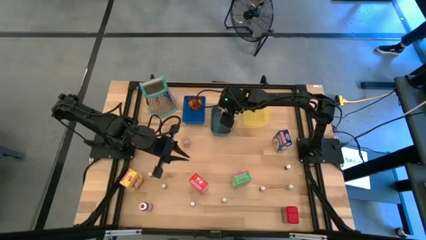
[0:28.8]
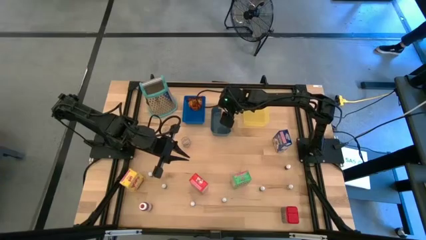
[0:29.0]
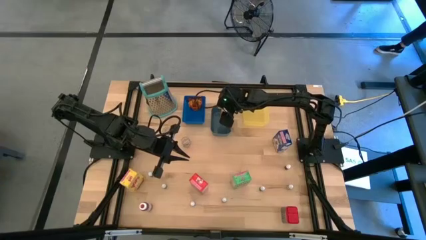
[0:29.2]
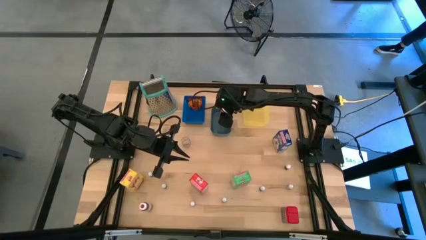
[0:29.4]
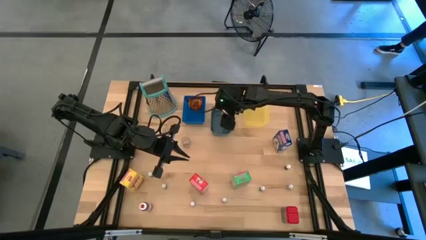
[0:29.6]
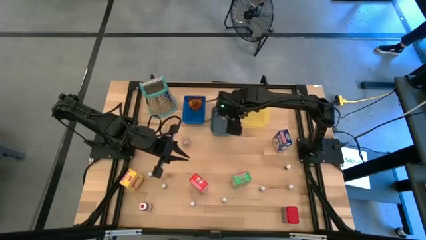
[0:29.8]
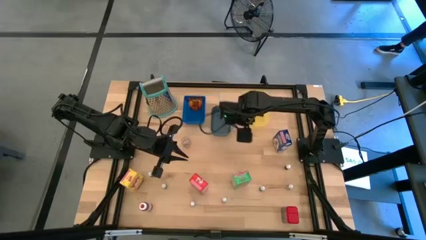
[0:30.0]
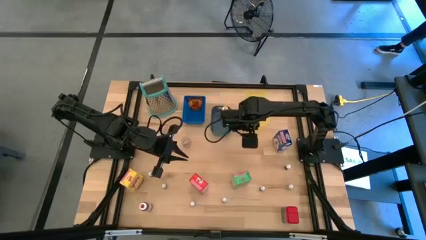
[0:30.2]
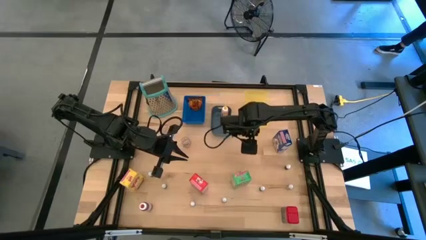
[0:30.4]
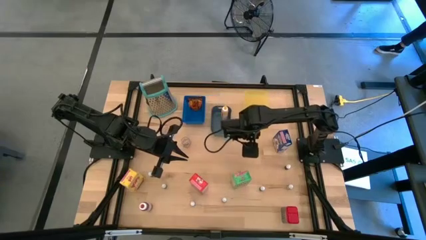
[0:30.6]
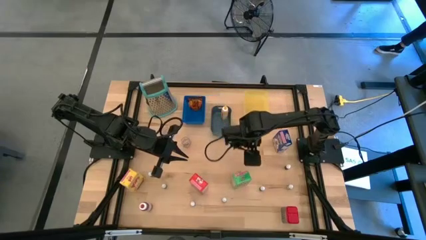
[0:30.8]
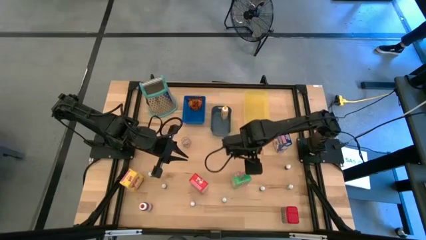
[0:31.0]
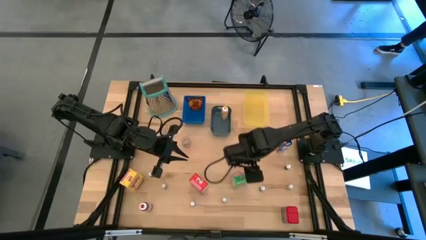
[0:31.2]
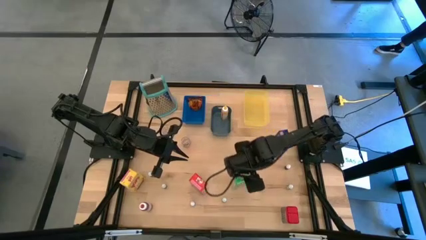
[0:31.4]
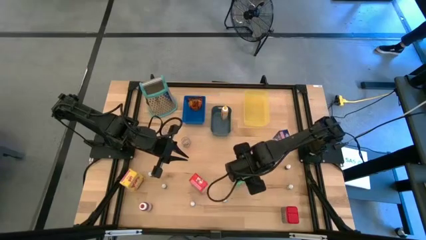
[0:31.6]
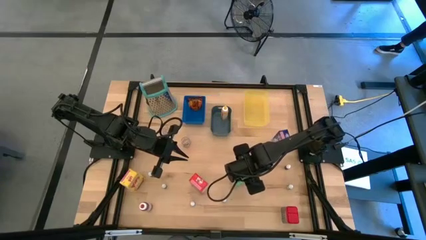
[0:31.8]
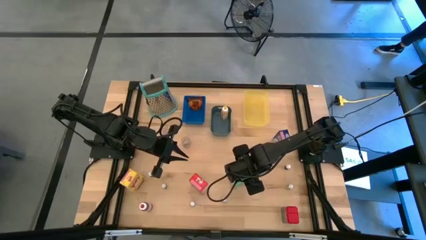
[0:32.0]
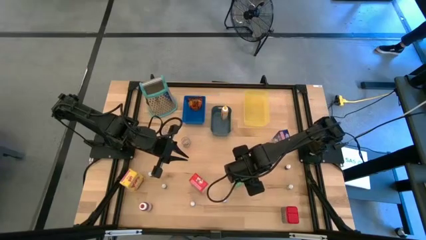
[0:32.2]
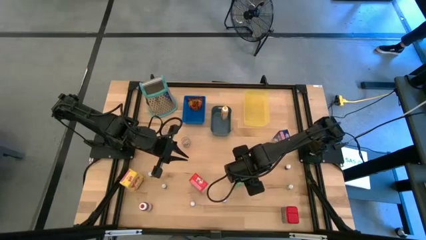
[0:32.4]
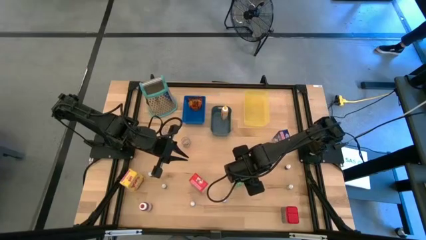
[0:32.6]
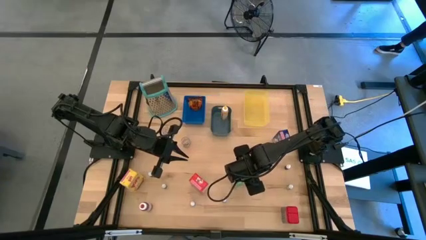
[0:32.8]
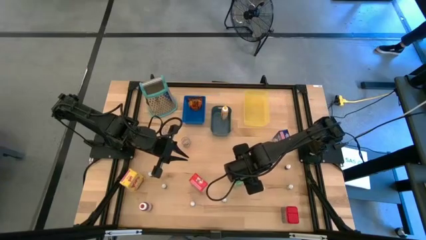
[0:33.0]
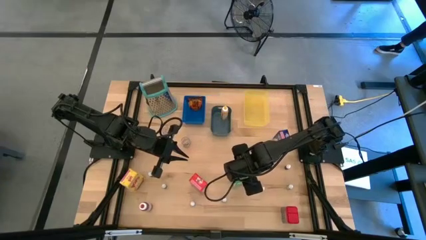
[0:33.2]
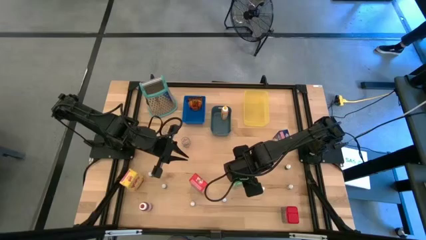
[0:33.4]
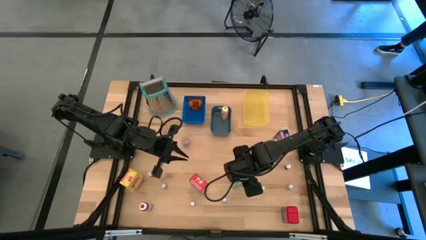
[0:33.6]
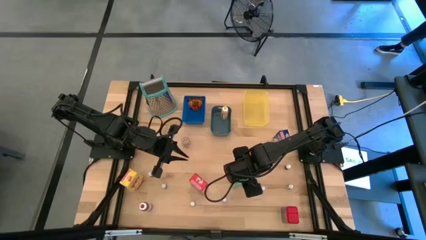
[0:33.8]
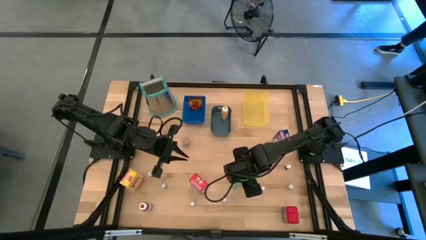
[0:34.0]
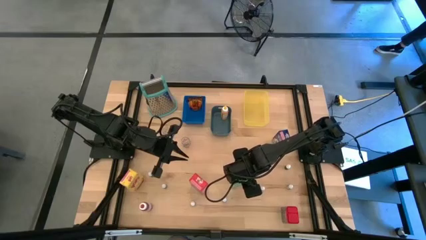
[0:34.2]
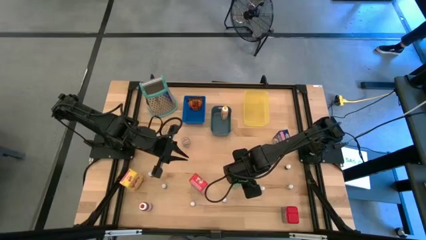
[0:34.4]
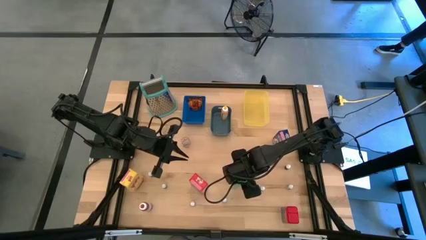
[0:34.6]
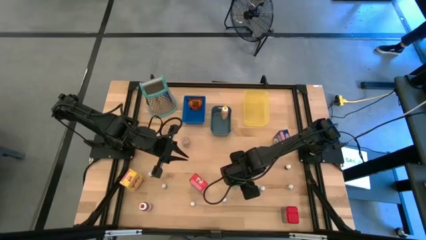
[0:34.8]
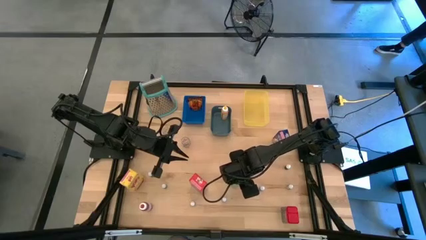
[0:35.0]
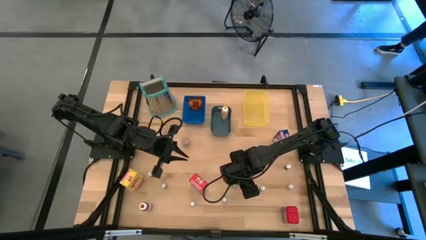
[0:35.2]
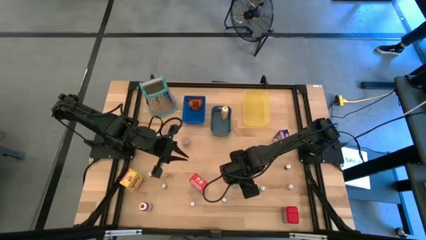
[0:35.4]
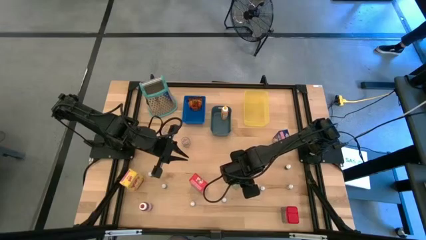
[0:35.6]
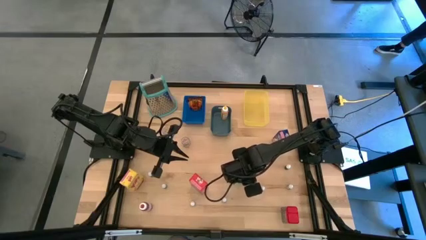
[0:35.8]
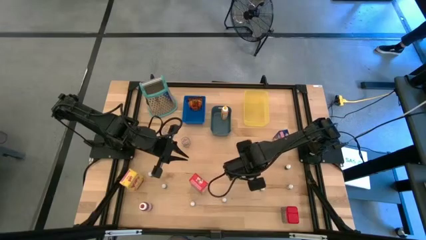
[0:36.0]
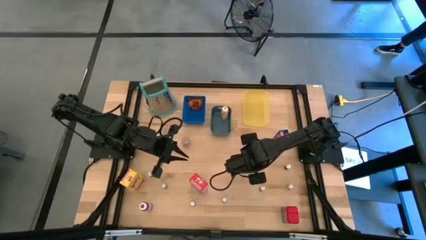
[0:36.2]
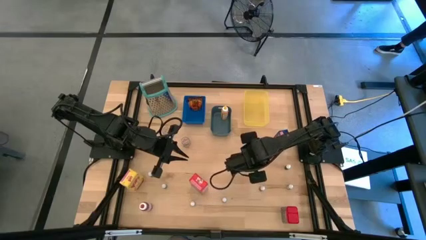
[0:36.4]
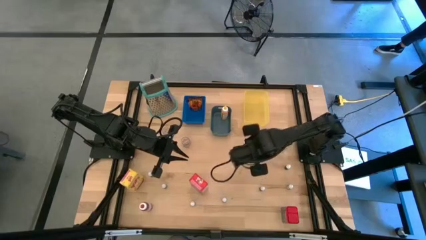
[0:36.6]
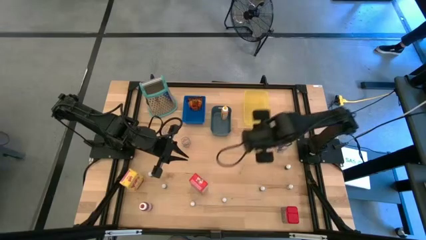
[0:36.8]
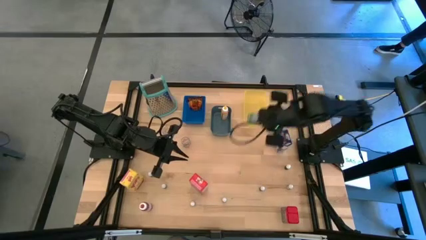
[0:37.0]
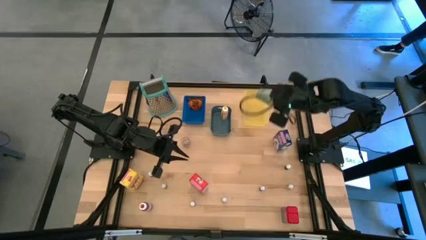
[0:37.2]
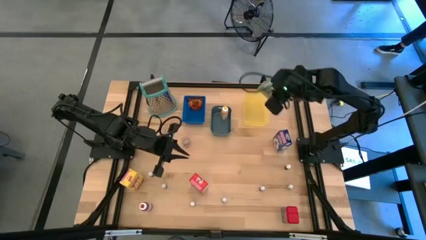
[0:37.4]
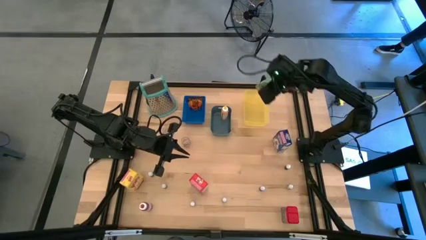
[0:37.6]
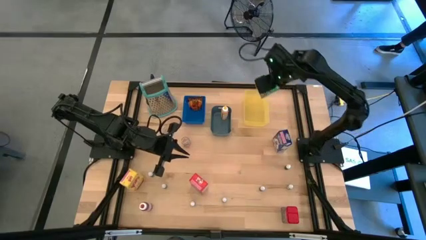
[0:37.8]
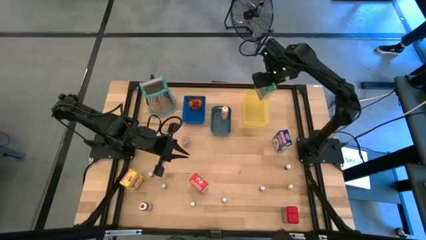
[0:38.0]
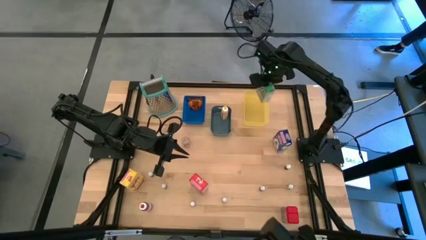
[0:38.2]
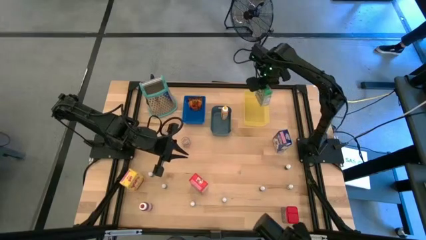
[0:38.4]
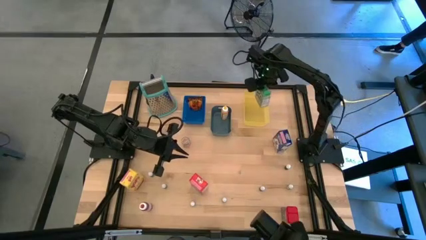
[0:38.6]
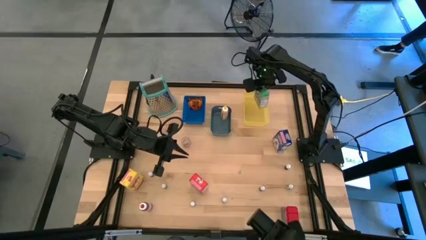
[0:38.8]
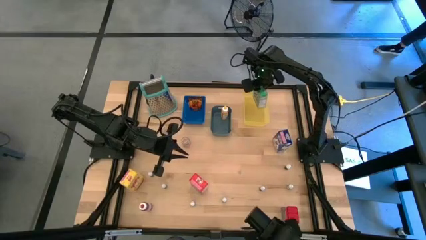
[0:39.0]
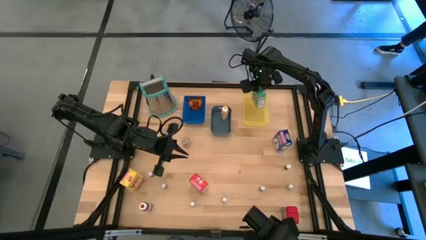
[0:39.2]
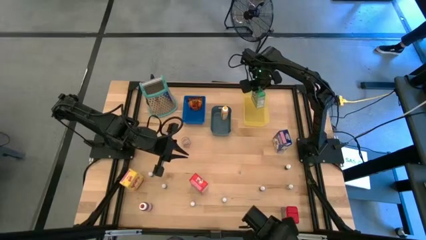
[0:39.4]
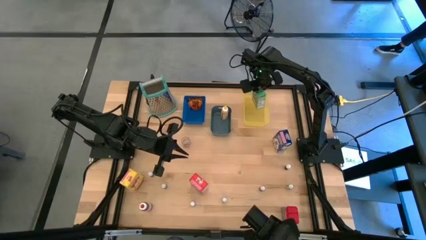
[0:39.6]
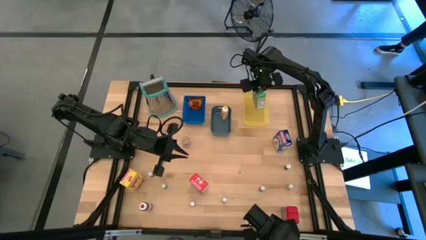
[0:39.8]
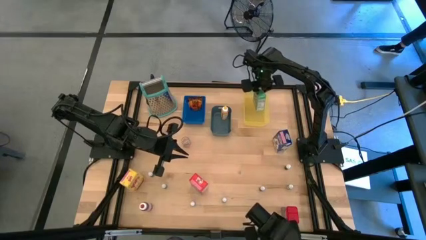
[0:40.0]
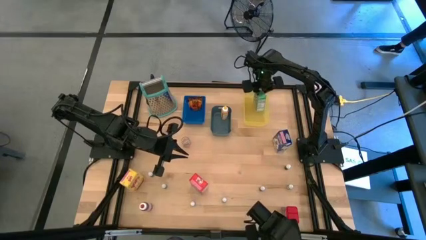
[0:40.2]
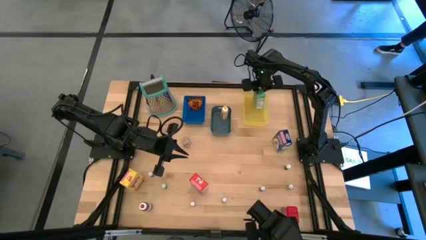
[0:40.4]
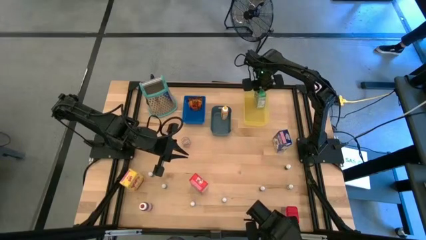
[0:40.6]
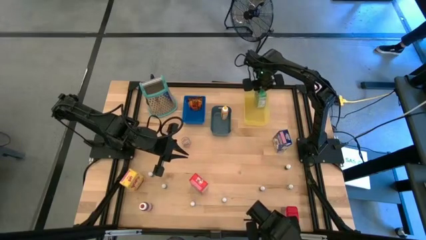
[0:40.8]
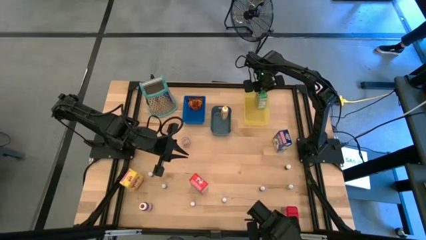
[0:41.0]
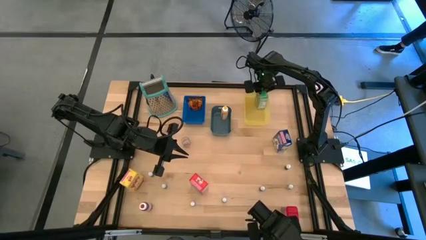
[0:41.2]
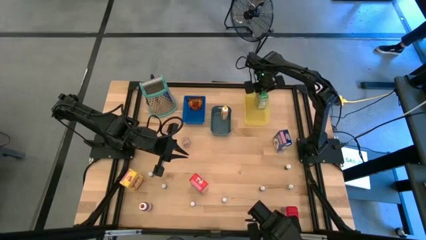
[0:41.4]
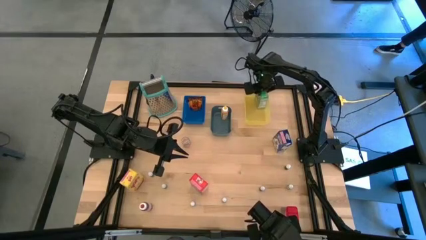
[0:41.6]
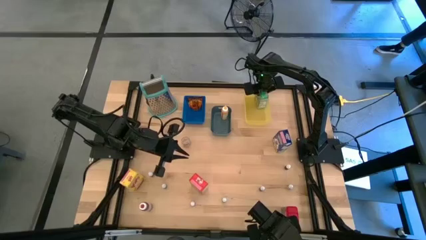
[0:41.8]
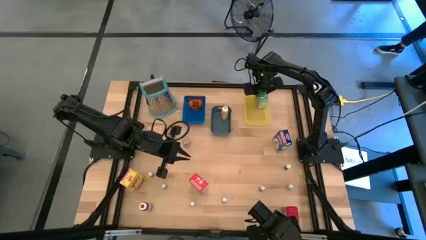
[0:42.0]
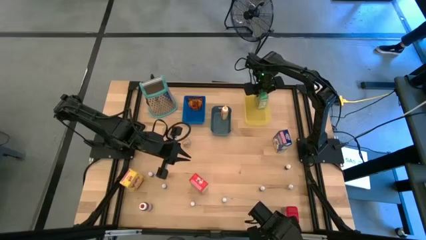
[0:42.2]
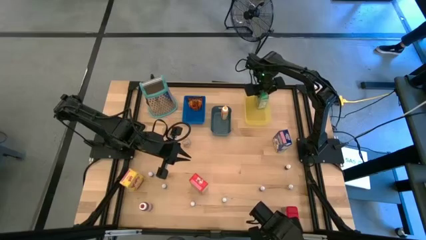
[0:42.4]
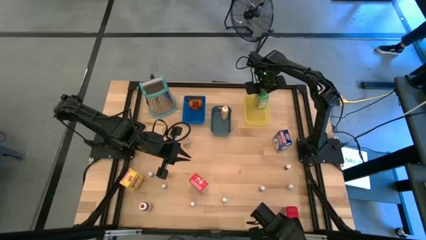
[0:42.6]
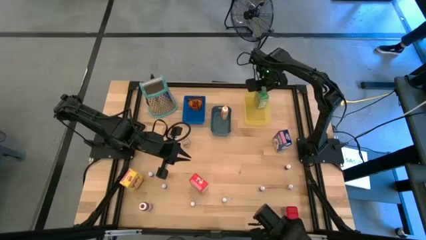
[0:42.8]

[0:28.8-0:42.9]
Task: Pick & Place Kitchen Items
Put the green cereal box into the yellow bin

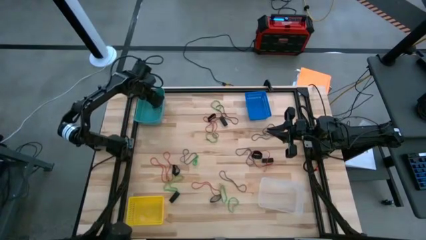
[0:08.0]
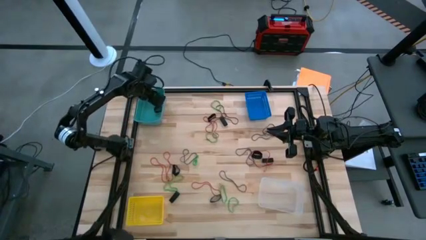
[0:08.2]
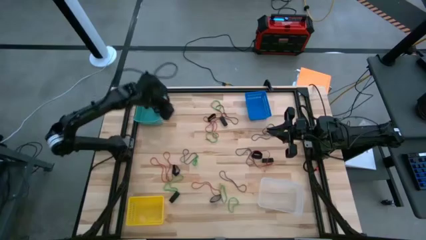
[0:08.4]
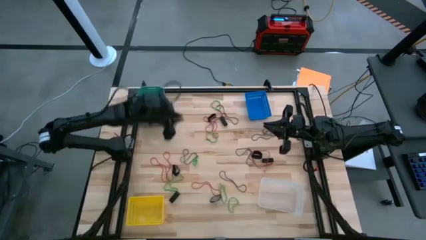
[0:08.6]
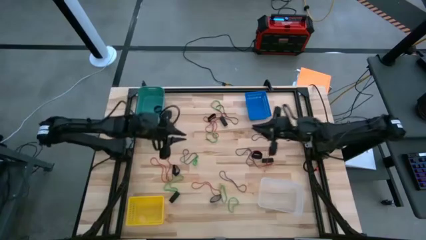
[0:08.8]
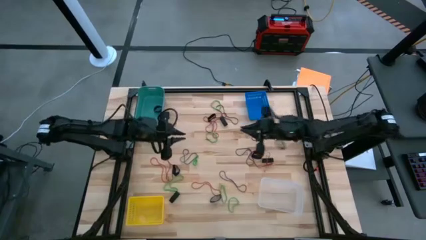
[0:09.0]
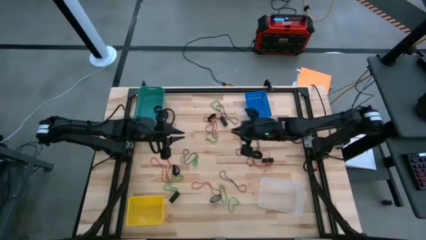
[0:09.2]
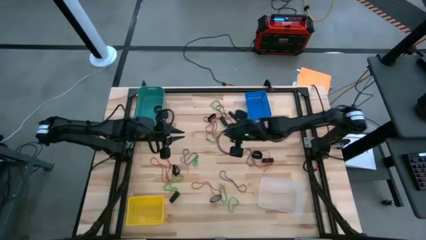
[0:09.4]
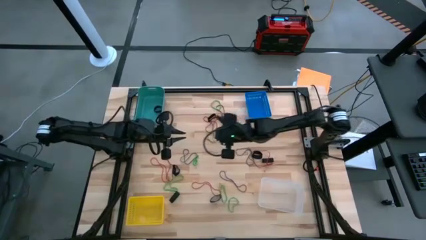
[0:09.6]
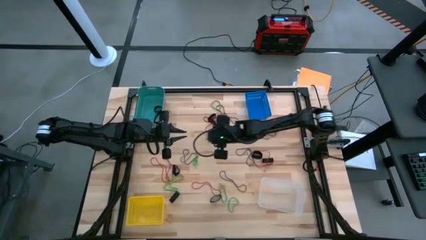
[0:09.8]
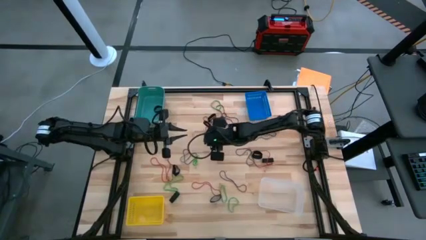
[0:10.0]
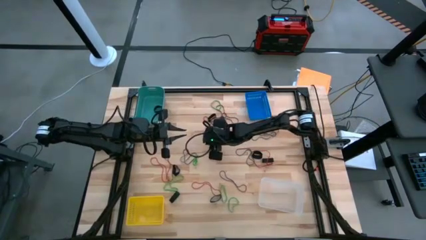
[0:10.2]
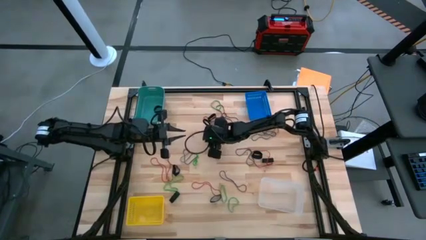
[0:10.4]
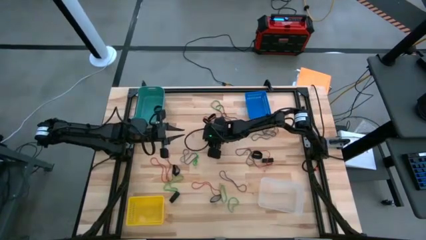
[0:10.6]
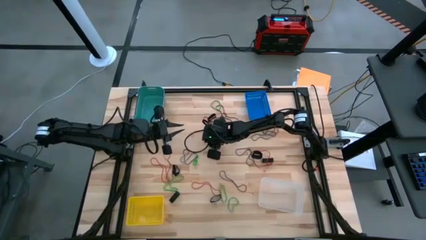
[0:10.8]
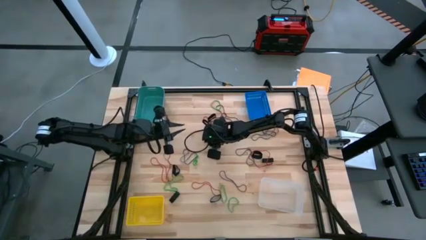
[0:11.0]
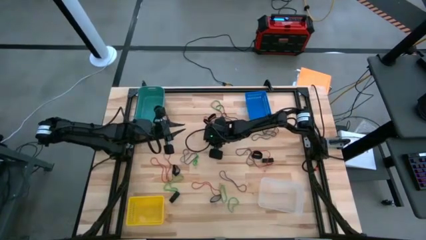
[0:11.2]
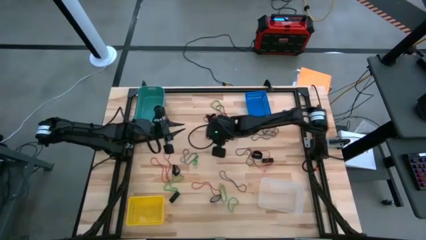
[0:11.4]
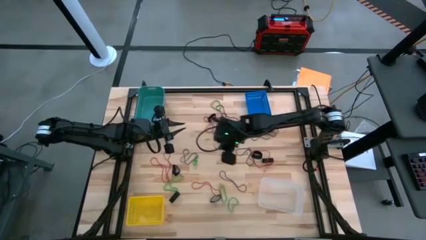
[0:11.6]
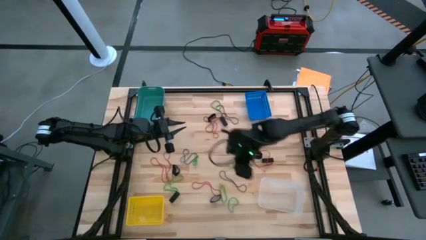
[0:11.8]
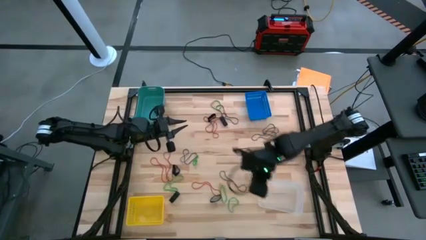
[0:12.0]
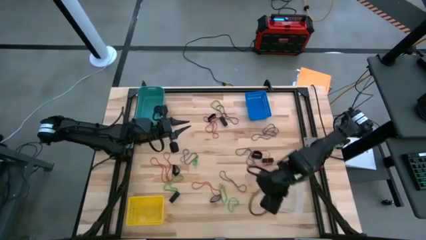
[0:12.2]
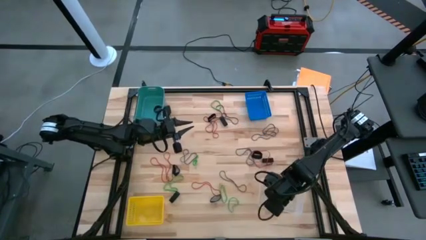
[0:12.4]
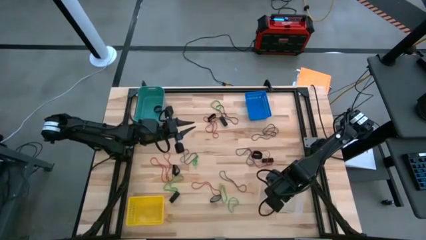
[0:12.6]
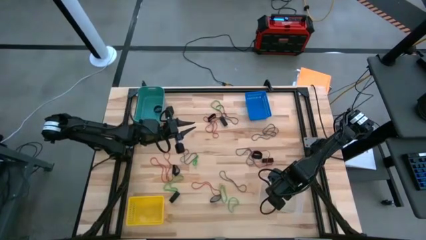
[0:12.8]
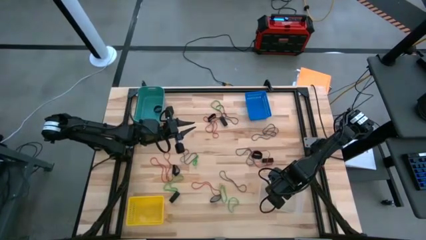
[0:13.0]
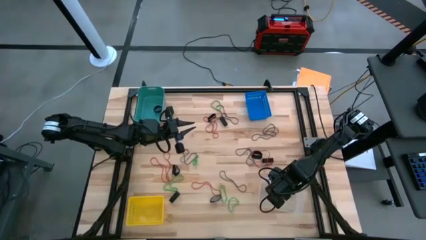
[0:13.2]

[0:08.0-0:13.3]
Task: Sort rubber bands into baskets
Put the green rubber band into the transparent bin
